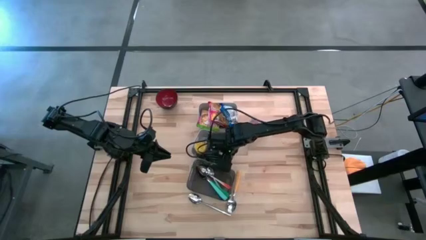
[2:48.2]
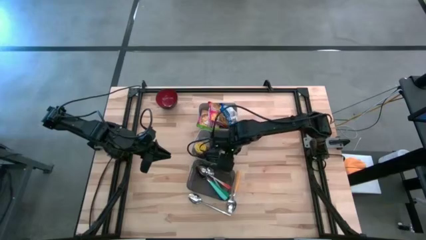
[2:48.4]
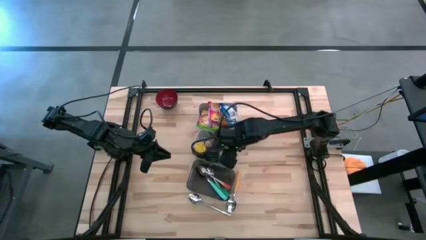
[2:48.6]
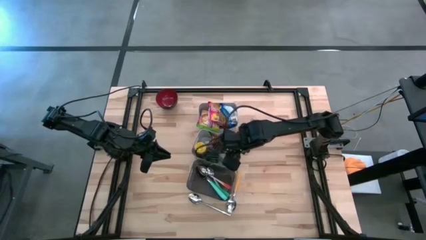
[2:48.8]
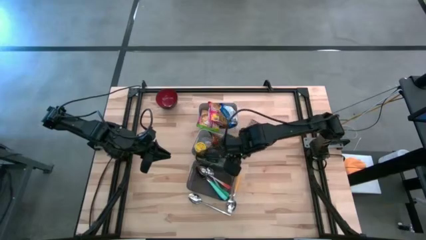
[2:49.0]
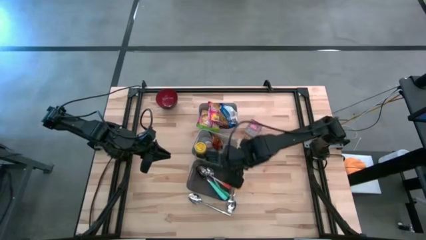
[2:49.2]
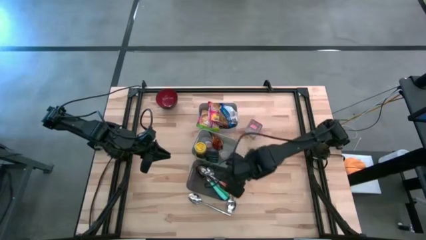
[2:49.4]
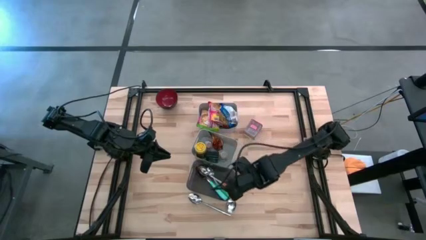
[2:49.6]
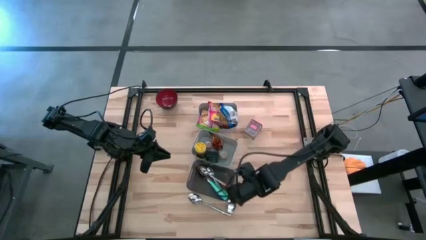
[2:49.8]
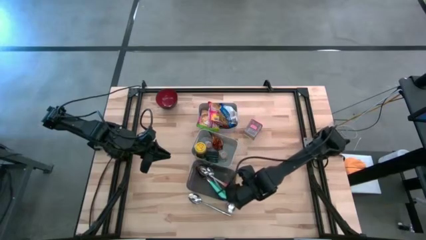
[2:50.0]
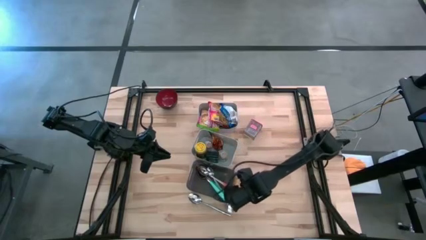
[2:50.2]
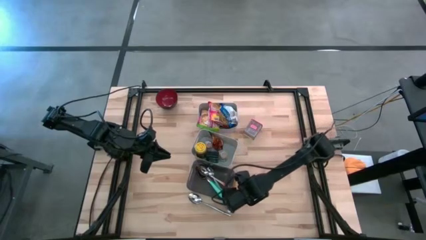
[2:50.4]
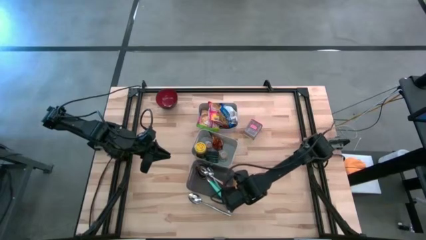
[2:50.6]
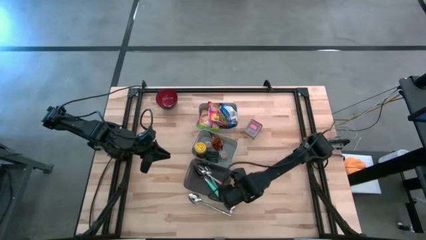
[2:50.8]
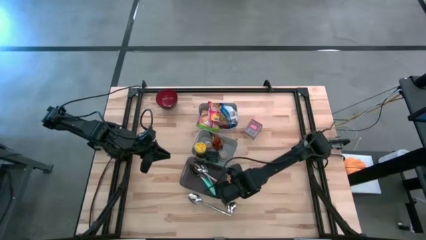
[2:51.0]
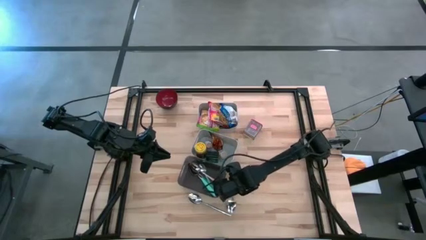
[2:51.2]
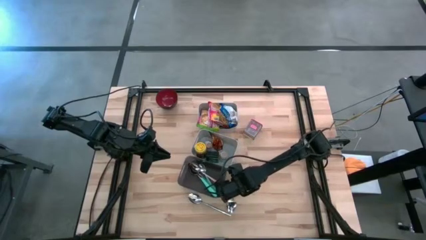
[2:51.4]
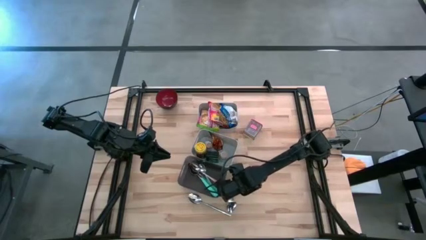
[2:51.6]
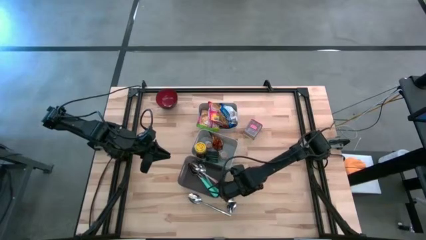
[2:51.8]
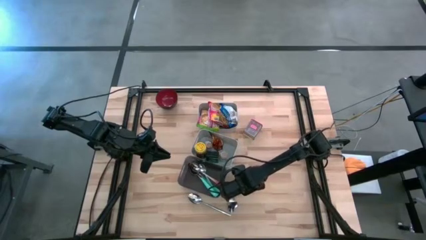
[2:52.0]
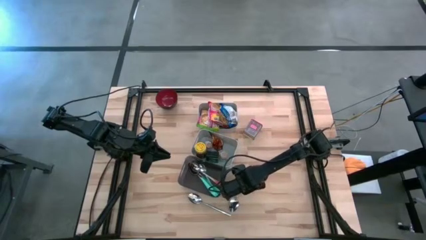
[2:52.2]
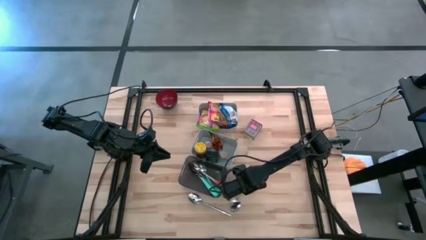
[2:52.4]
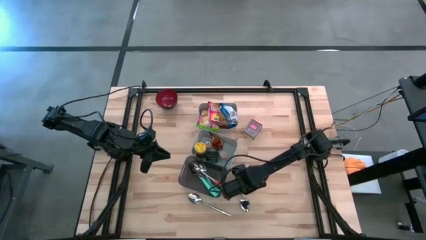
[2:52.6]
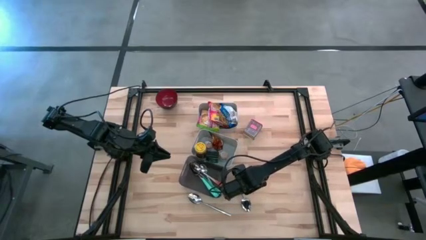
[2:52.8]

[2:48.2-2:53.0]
Put the light orange spoon into the black bin

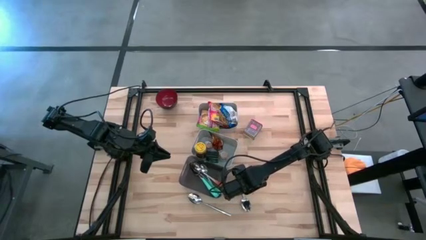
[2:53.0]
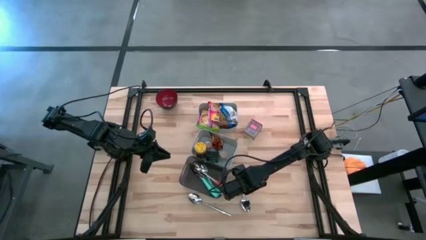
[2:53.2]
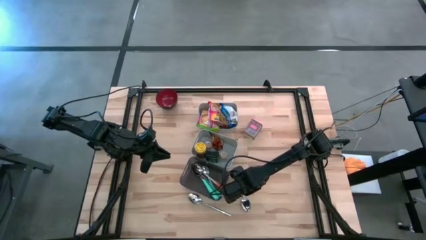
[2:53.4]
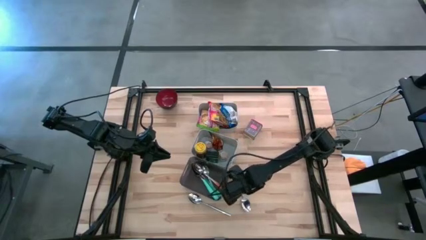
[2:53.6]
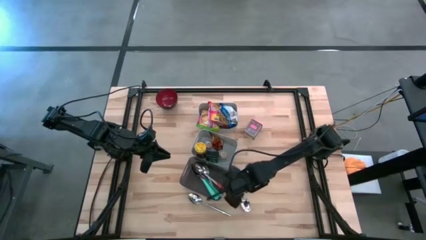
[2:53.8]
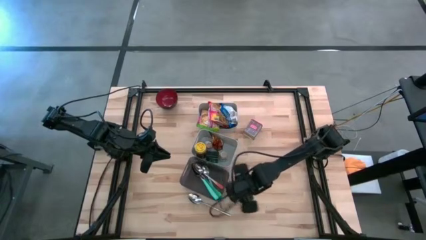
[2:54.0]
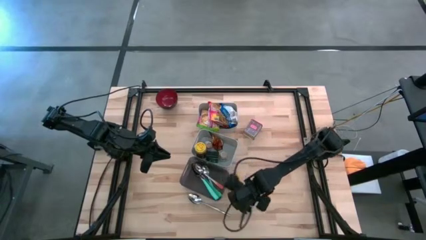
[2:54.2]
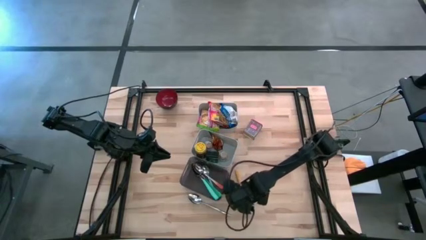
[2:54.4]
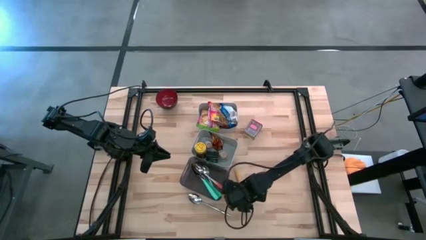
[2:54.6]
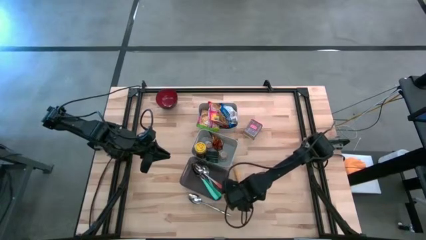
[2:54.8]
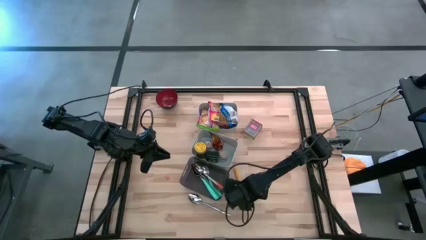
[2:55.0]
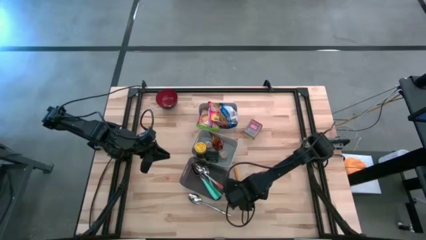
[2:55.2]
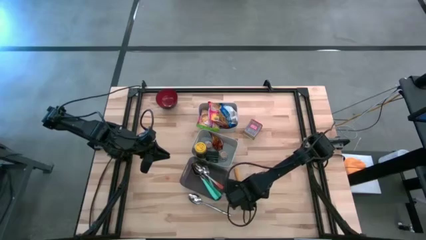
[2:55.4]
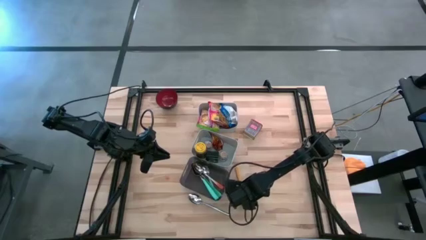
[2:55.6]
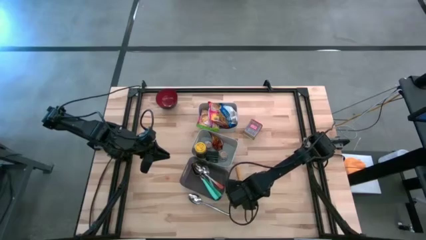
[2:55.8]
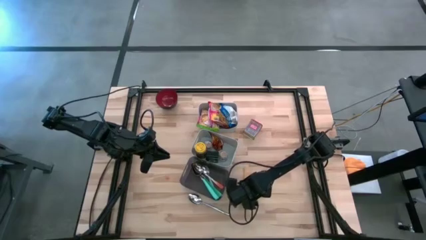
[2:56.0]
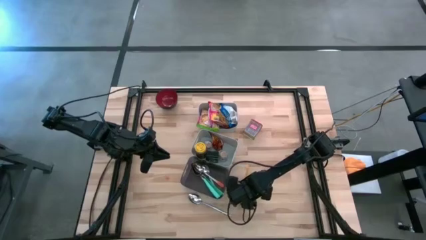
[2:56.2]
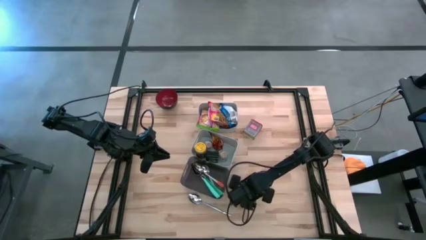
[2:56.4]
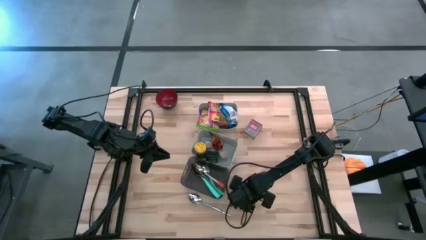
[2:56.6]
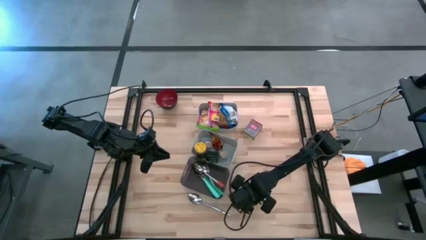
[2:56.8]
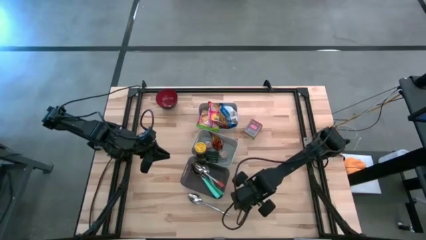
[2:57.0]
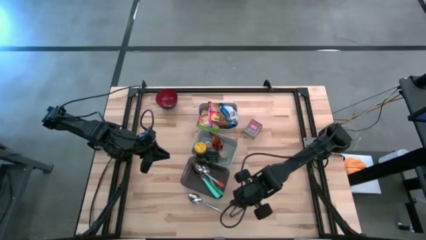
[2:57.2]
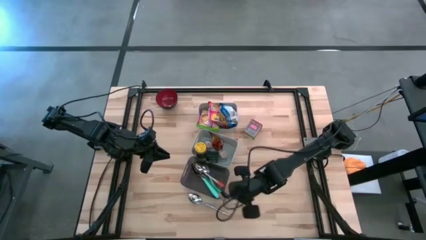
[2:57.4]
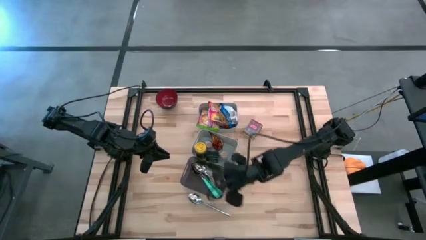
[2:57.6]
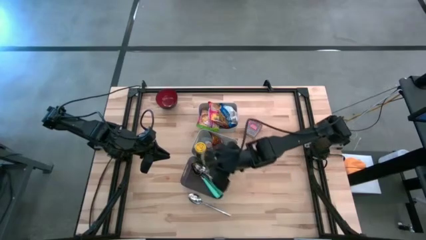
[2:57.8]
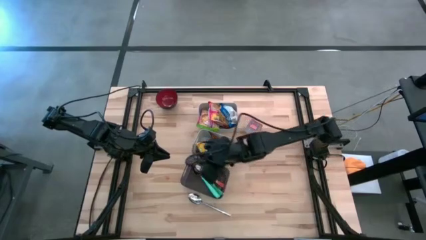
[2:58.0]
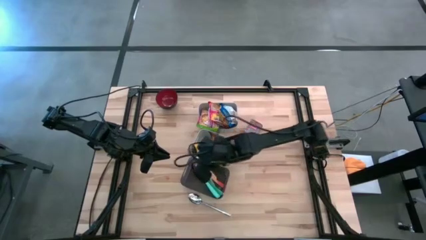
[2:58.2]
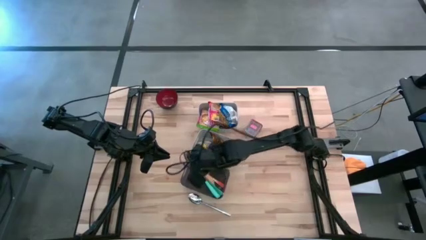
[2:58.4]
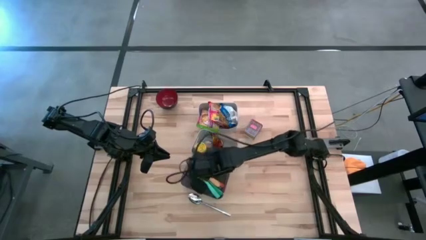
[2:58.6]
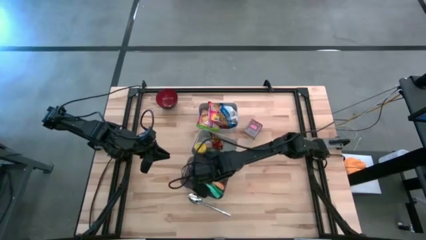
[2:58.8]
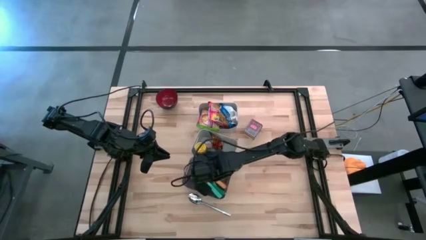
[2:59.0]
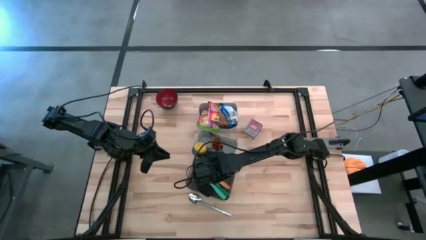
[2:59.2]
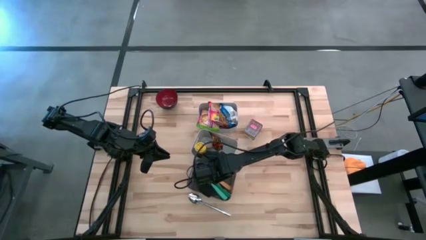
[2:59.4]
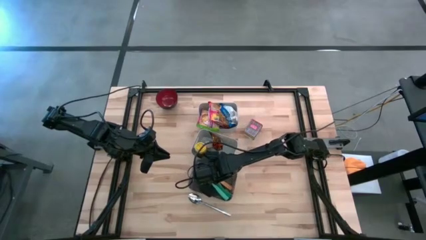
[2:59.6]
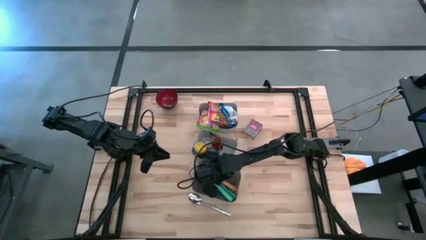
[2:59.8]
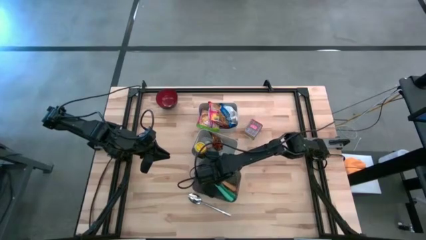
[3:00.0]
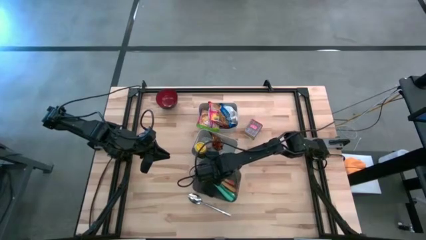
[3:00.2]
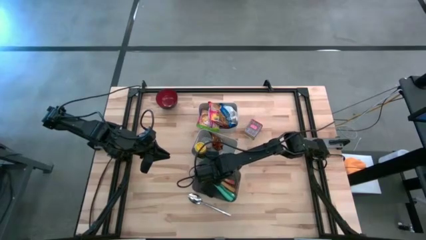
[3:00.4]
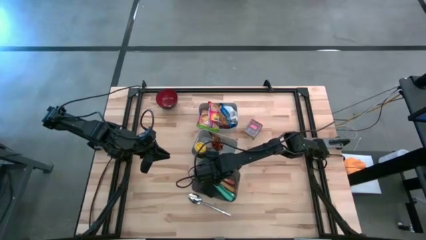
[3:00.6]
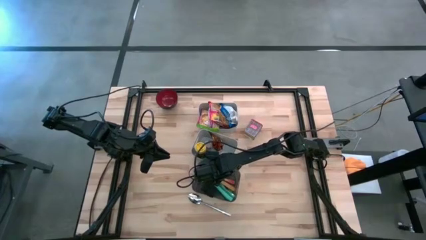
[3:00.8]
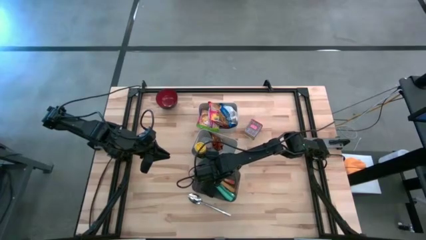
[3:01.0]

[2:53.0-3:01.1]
Put the light orange spoon into the black bin
